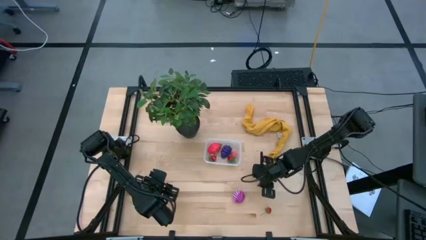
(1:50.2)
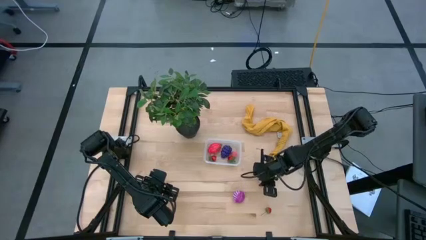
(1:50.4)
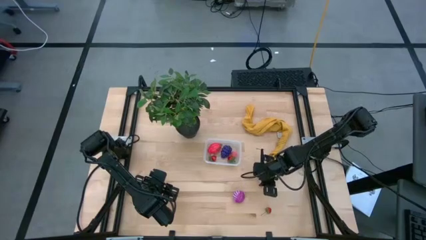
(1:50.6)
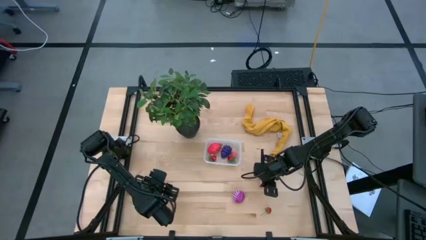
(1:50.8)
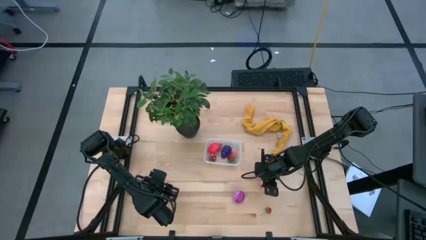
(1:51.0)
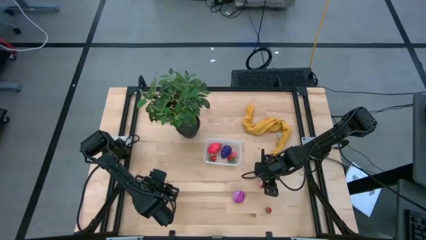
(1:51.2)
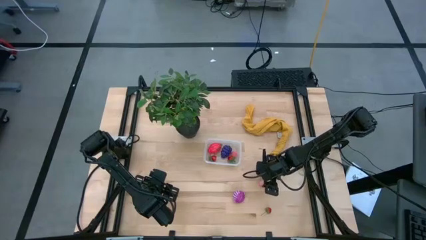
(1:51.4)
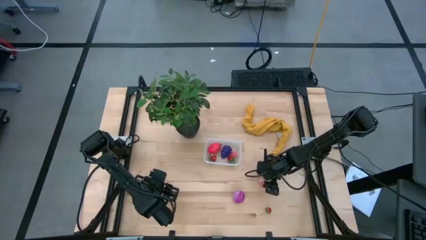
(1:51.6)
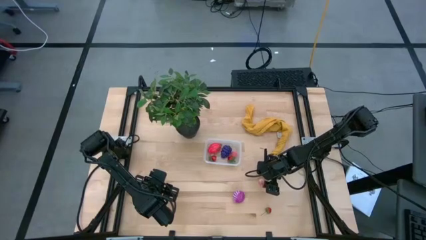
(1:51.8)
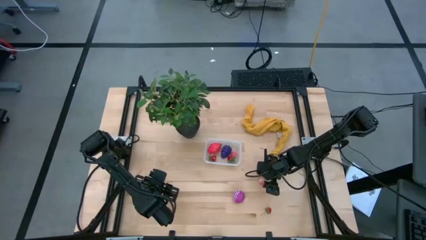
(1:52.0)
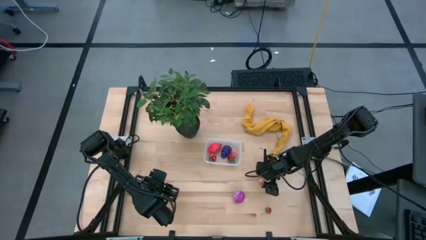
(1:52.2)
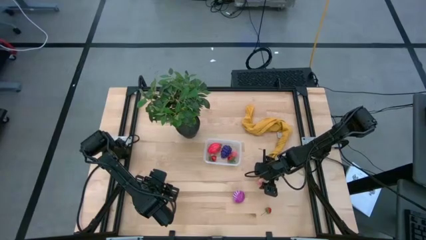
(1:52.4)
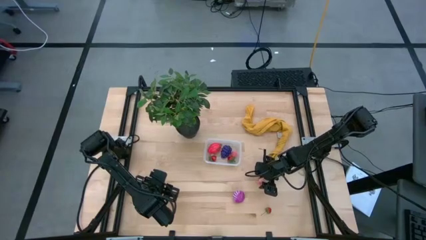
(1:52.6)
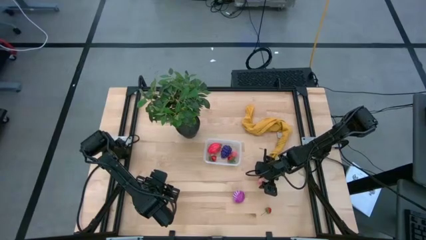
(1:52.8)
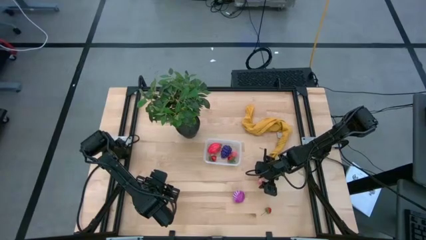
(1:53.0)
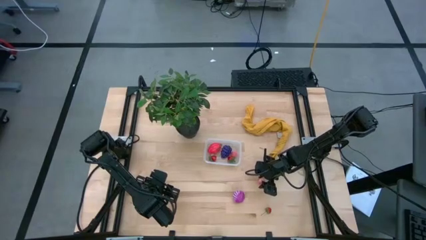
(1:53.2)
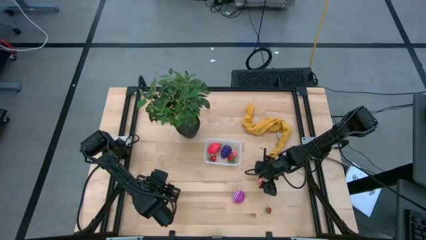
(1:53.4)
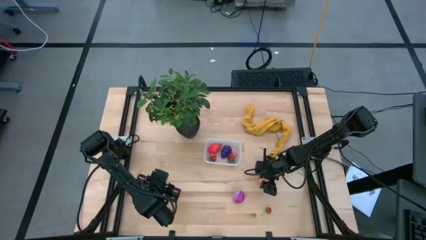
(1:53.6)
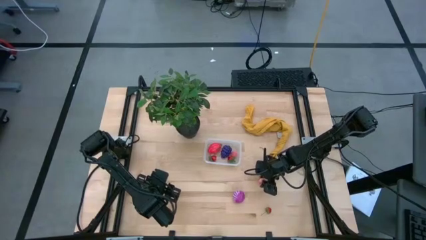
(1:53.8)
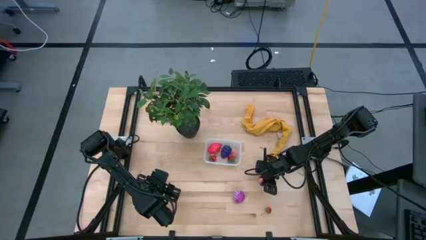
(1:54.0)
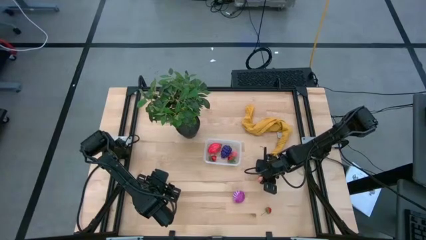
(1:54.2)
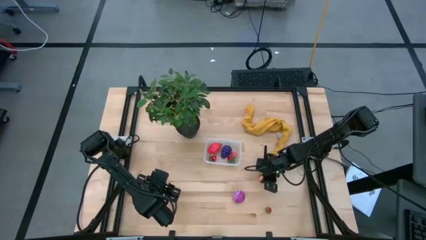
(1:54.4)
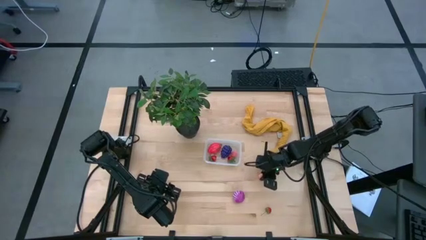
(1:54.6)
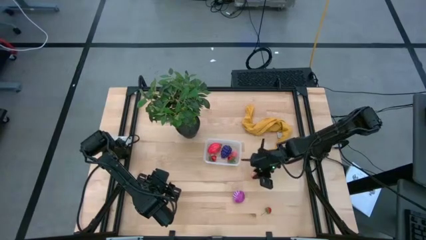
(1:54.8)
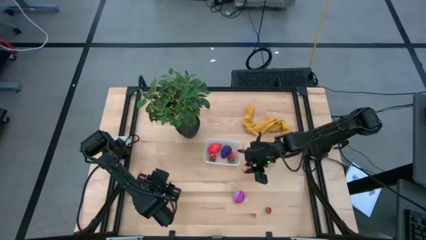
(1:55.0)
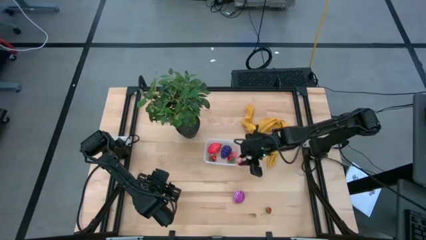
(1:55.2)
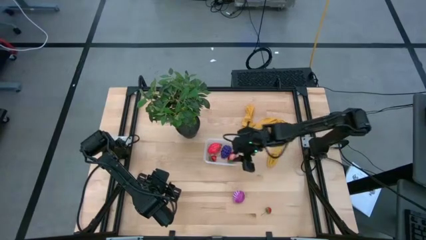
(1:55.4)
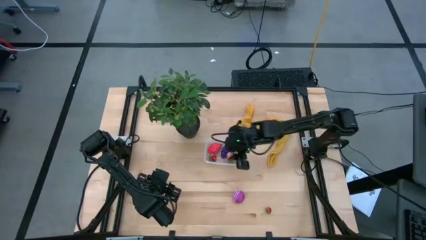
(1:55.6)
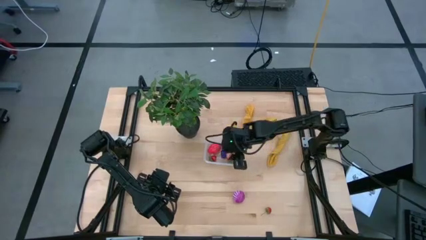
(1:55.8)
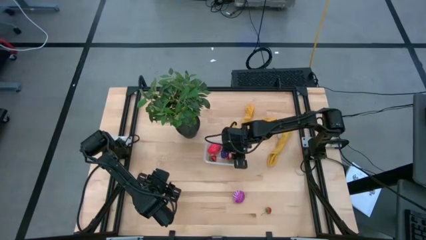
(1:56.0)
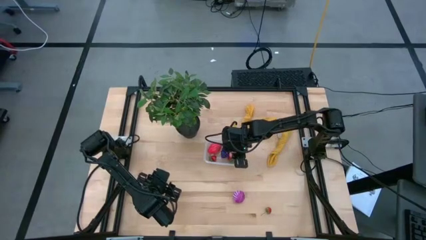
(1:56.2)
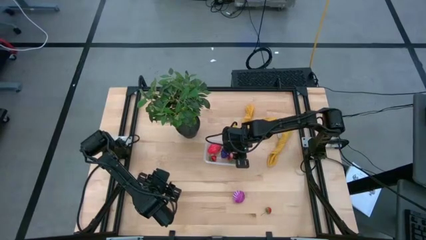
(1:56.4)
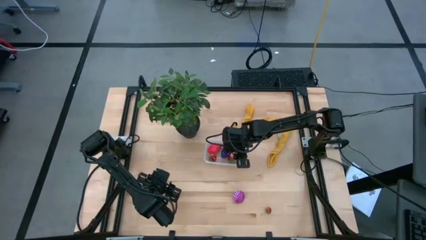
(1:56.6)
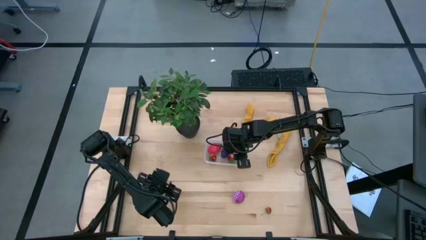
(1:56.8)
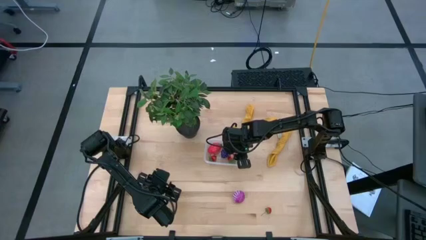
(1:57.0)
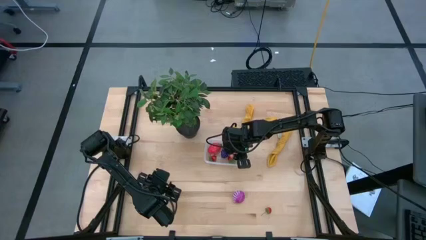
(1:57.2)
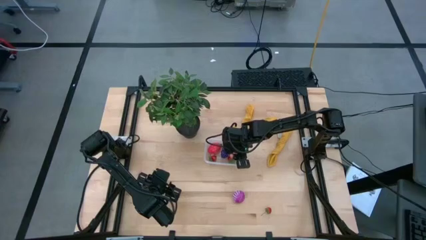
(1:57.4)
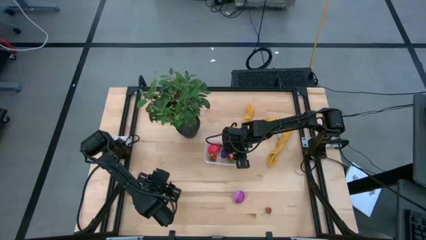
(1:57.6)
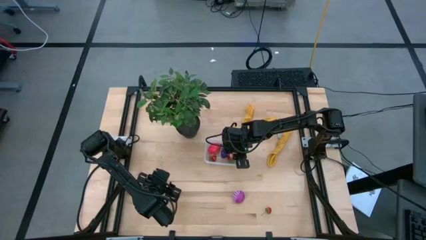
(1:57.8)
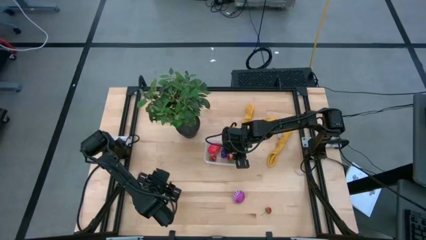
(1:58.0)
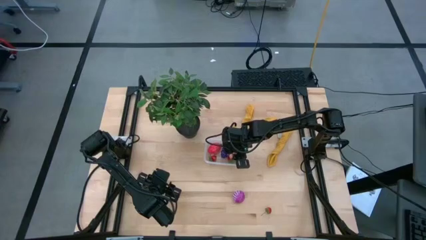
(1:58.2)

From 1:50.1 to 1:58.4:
Task: Pick and placing Produce into tupperware
Put the peach into the bin

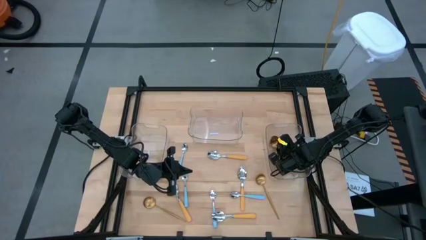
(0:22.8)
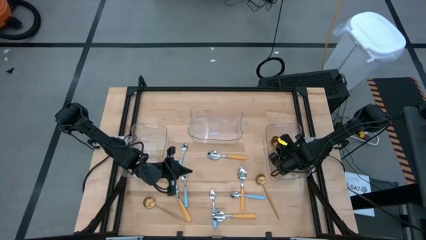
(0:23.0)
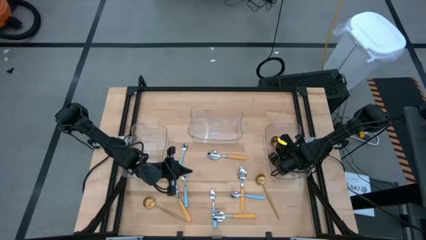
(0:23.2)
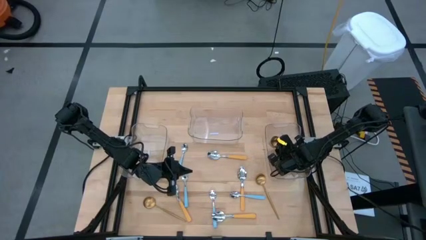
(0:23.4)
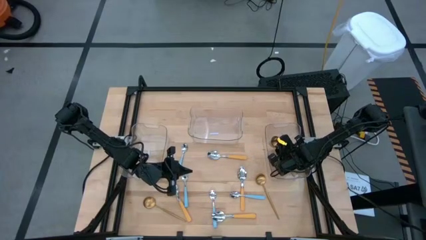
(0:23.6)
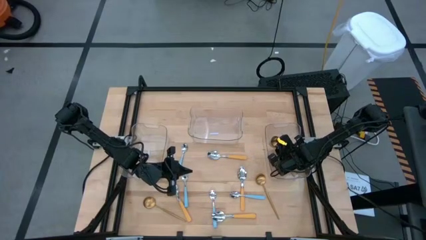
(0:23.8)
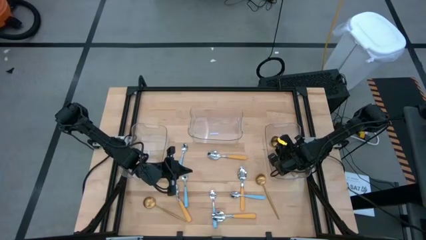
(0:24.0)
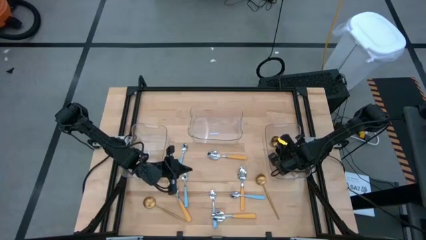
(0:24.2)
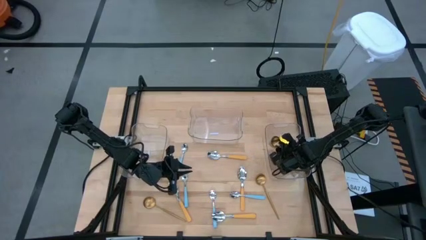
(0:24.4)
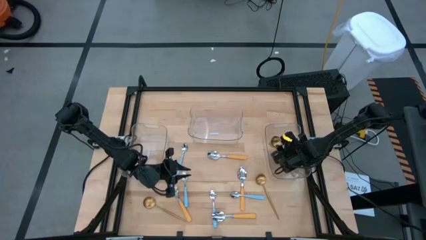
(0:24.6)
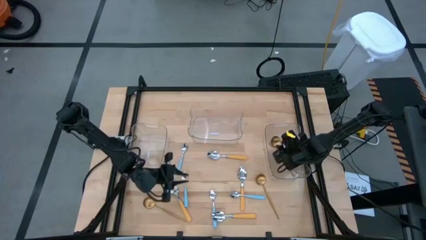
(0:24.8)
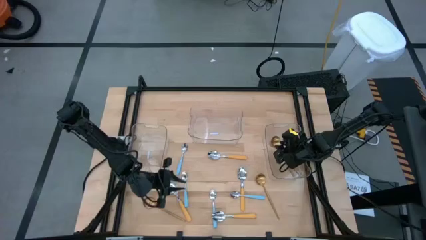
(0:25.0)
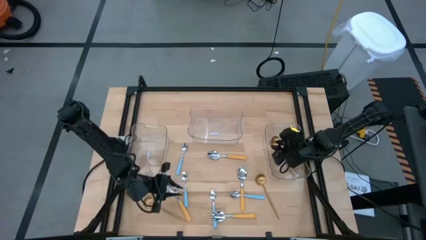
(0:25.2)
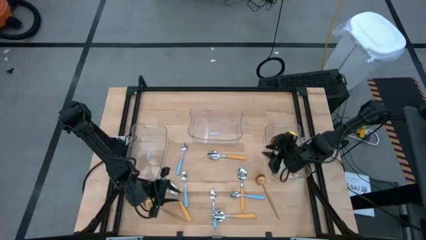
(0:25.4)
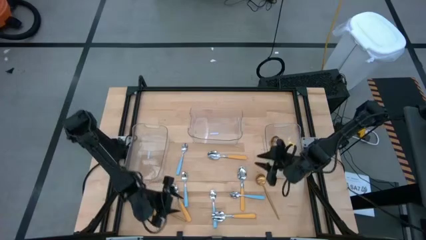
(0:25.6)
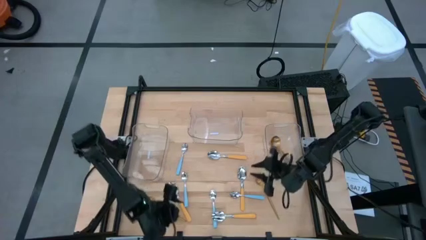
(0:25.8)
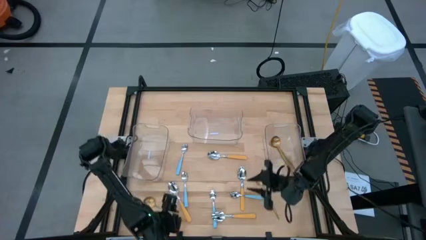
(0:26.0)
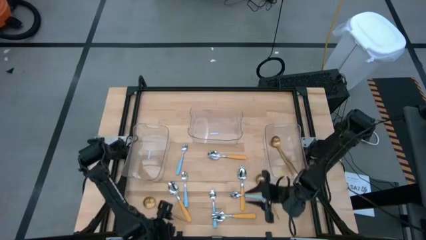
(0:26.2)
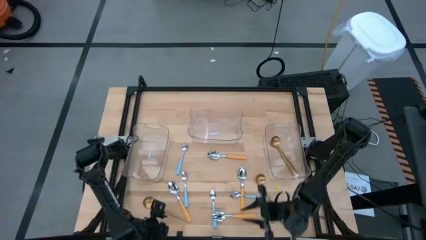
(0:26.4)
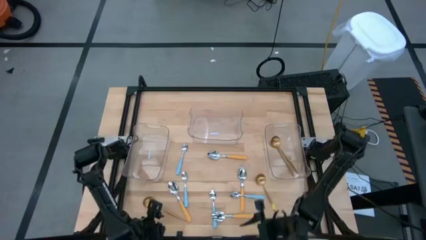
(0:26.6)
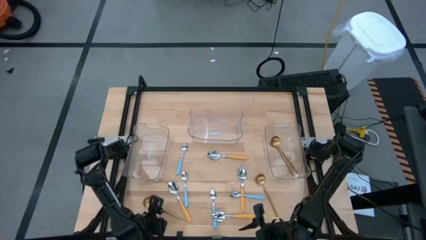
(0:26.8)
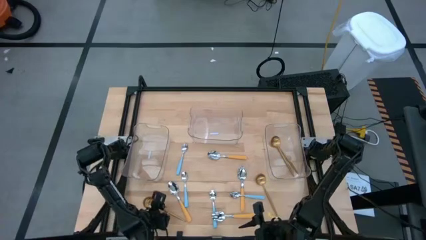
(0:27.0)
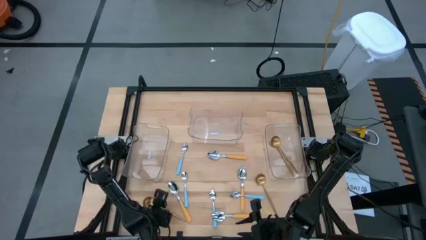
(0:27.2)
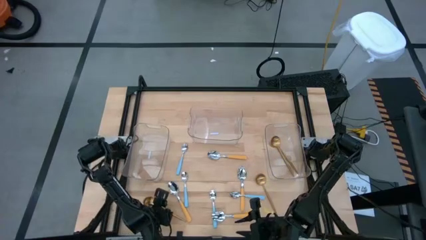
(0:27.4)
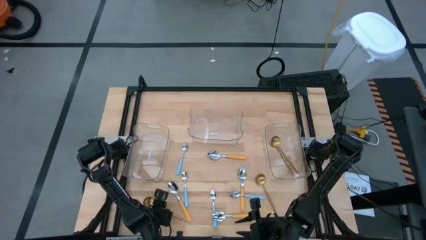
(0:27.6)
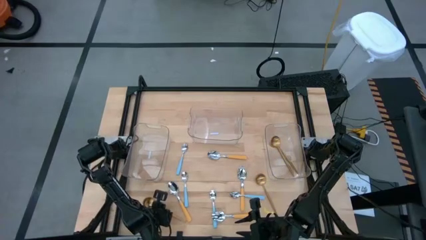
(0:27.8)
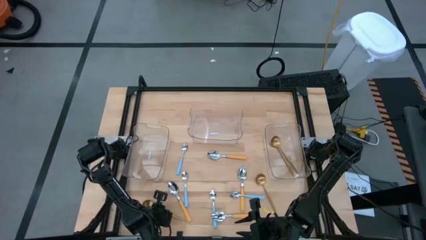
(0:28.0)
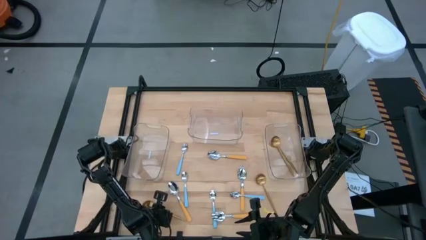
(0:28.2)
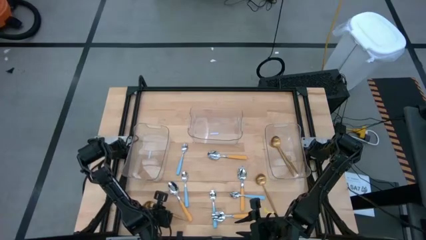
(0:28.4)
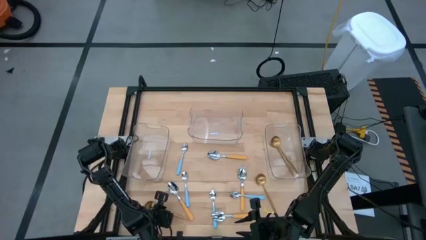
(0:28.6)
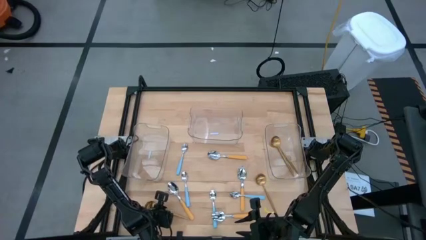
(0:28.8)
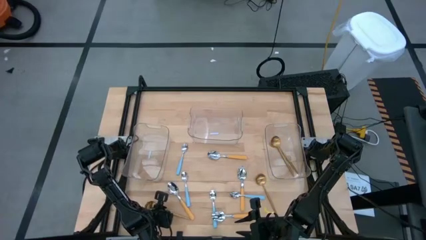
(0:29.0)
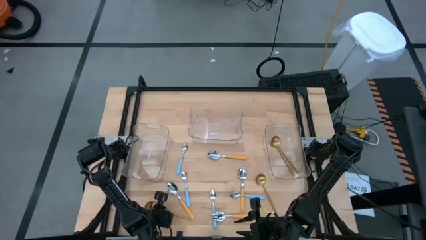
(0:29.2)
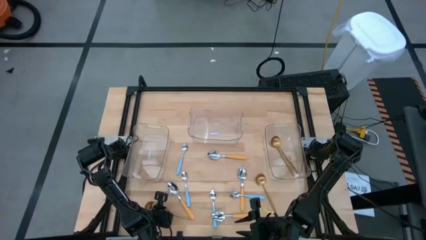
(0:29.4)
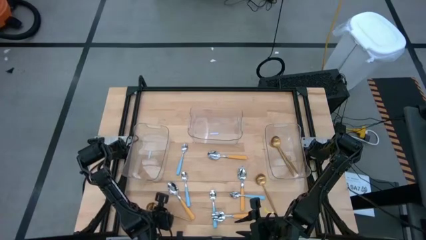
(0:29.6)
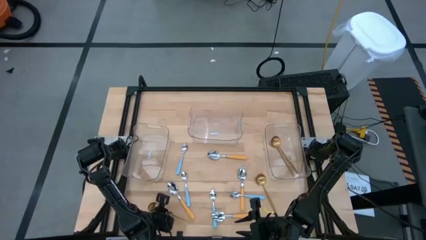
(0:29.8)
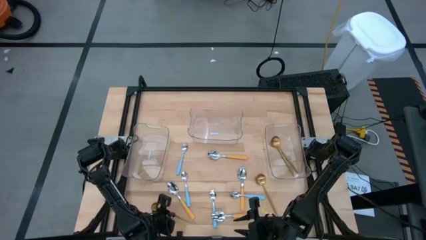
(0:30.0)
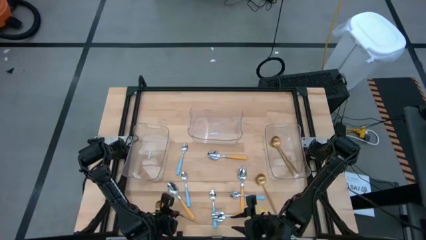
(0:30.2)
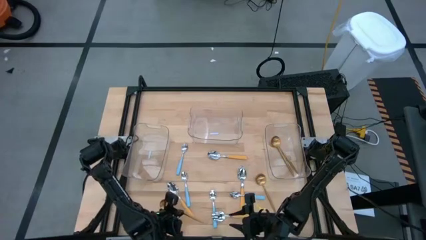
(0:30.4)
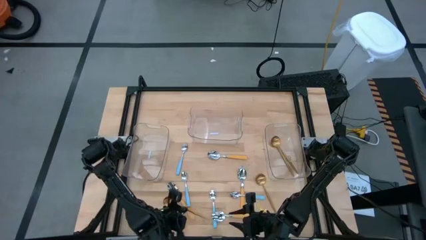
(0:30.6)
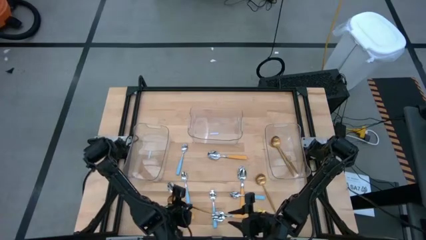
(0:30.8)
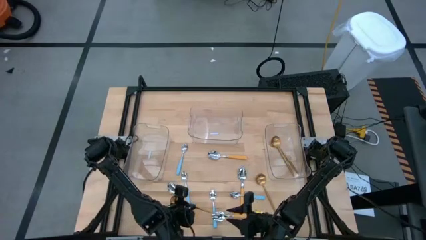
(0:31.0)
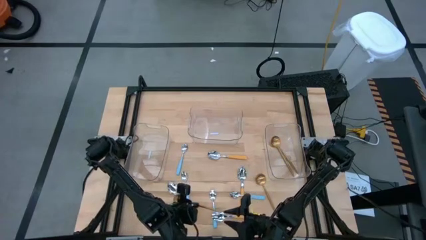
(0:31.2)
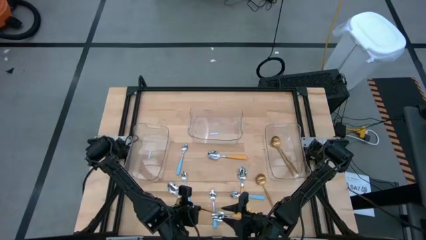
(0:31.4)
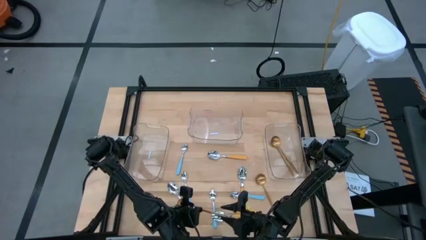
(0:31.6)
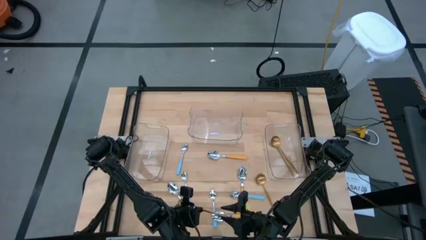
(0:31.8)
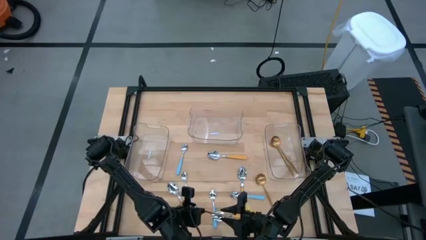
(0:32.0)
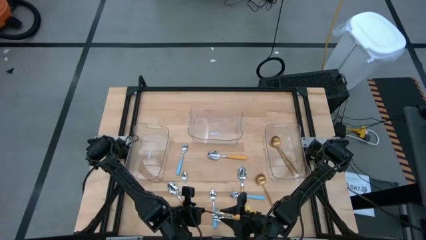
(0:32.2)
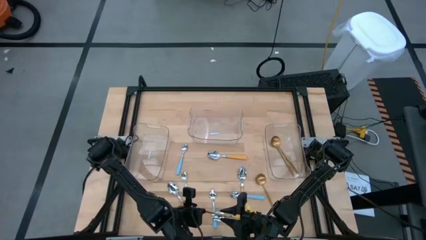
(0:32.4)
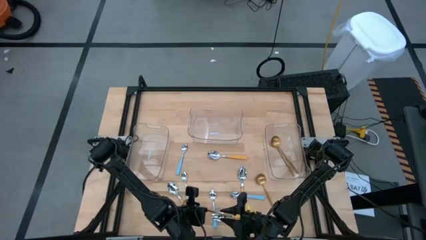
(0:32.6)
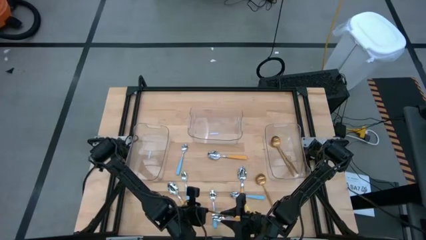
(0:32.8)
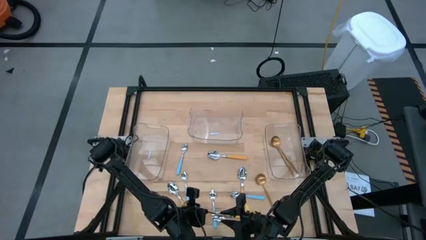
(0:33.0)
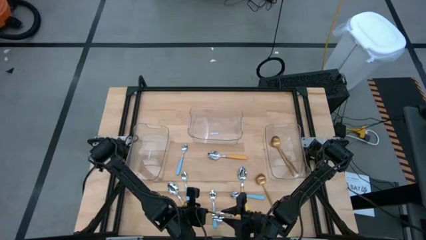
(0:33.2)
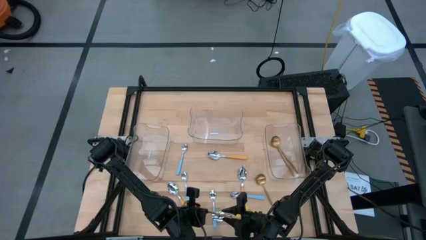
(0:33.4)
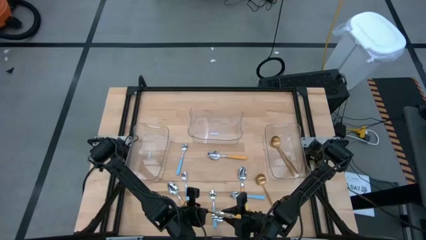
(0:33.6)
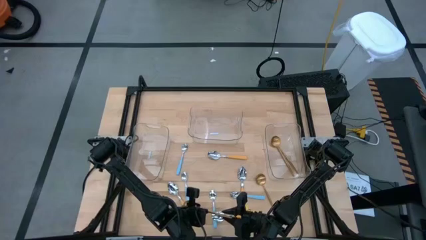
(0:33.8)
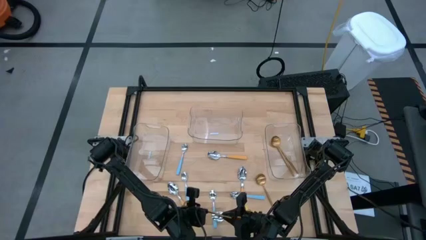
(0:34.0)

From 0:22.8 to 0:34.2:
Task: Sort silverware by color (type)
Put the gold spoon into the right transparent bin
